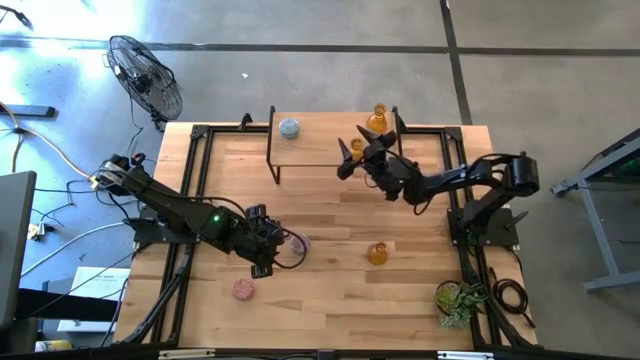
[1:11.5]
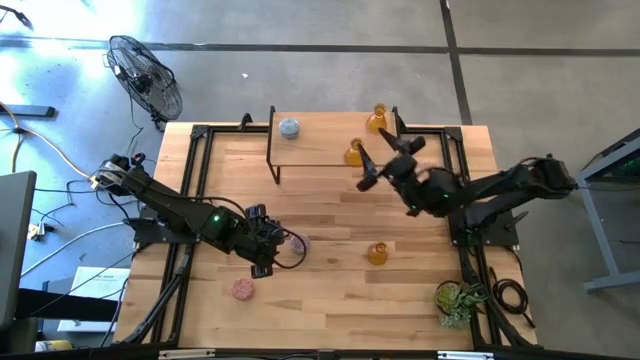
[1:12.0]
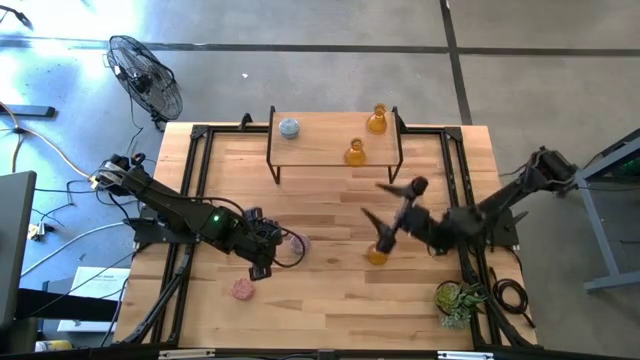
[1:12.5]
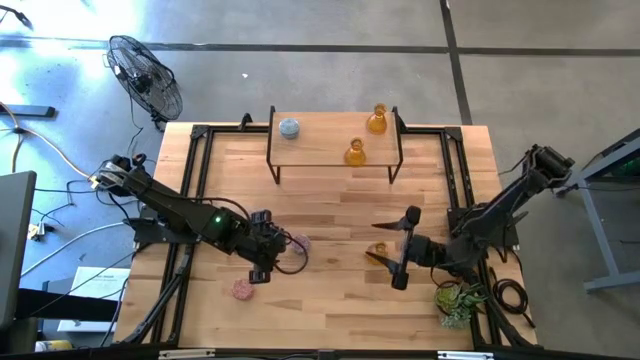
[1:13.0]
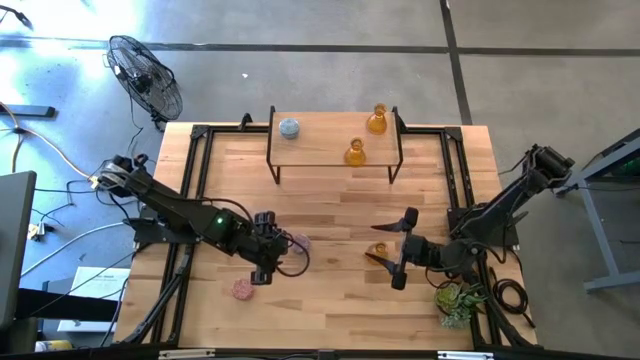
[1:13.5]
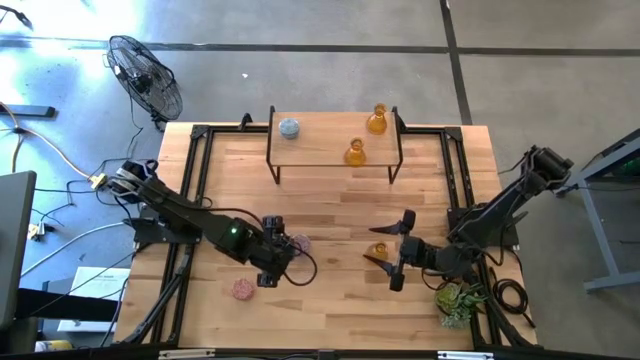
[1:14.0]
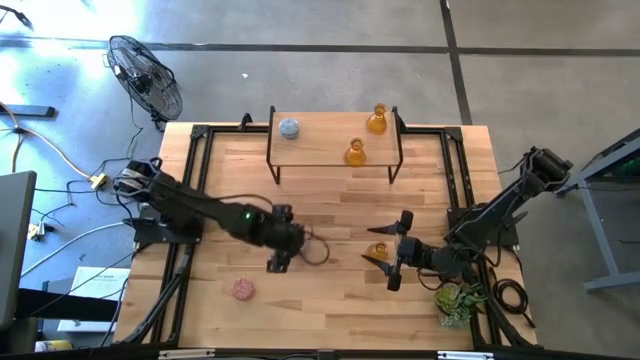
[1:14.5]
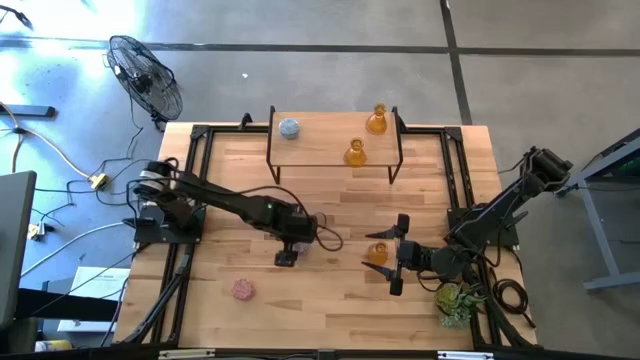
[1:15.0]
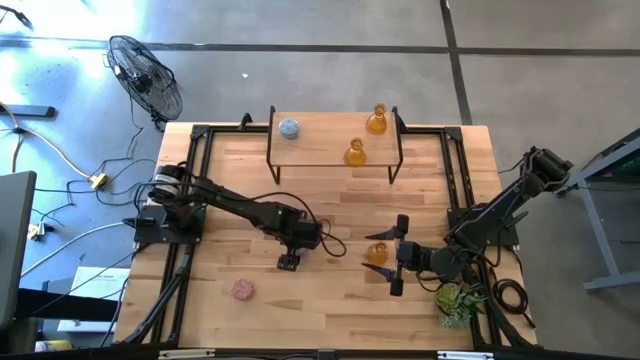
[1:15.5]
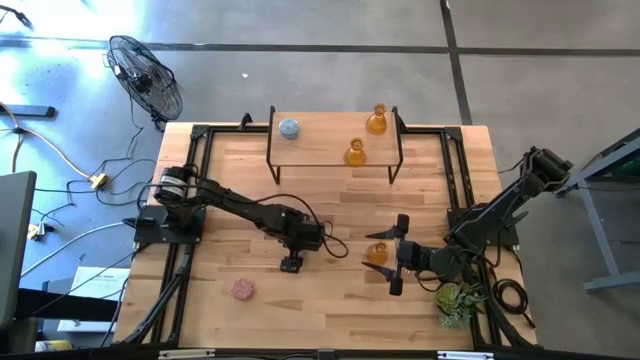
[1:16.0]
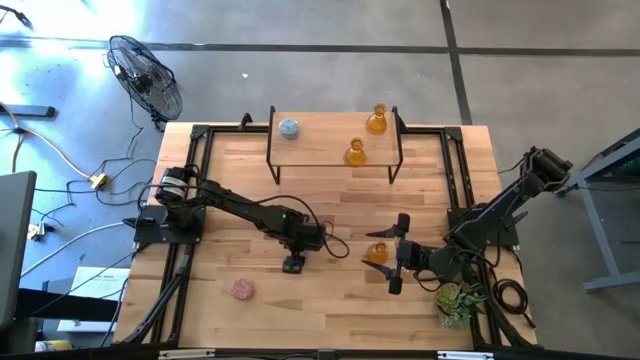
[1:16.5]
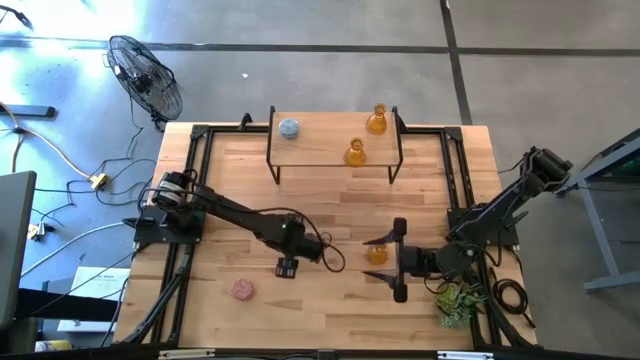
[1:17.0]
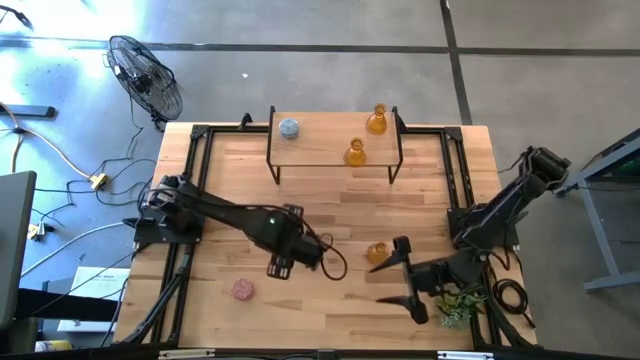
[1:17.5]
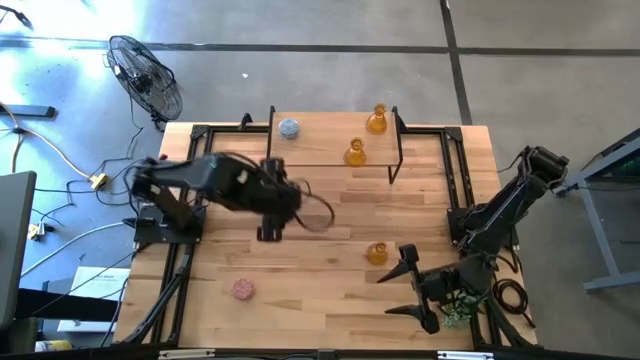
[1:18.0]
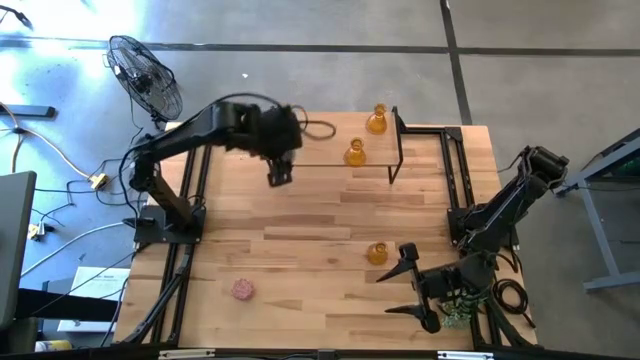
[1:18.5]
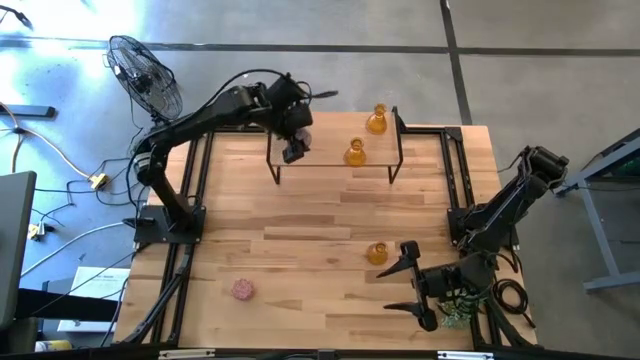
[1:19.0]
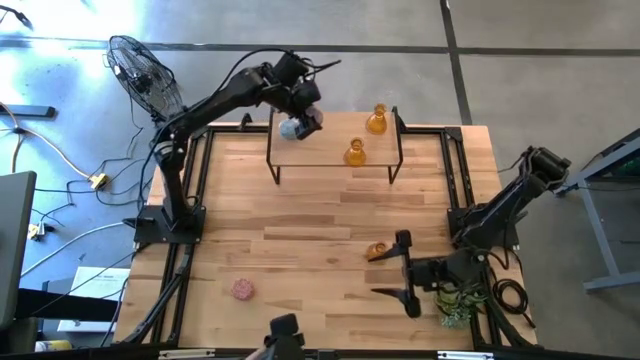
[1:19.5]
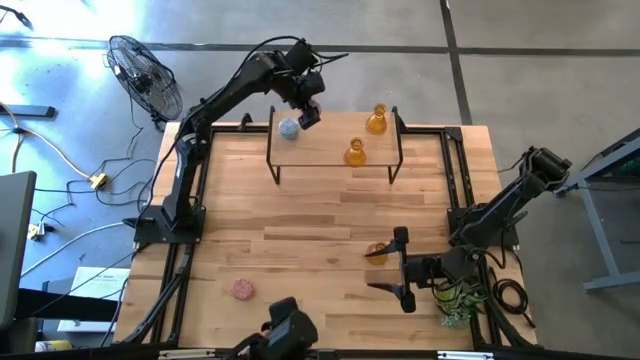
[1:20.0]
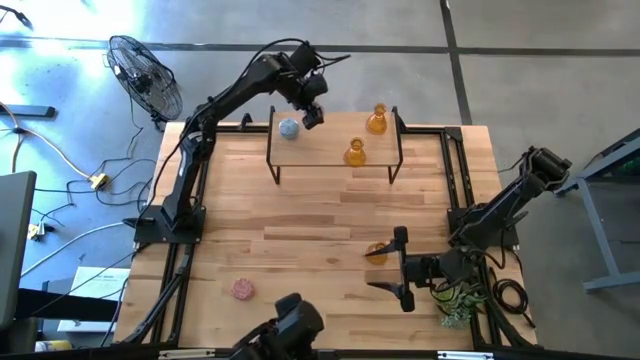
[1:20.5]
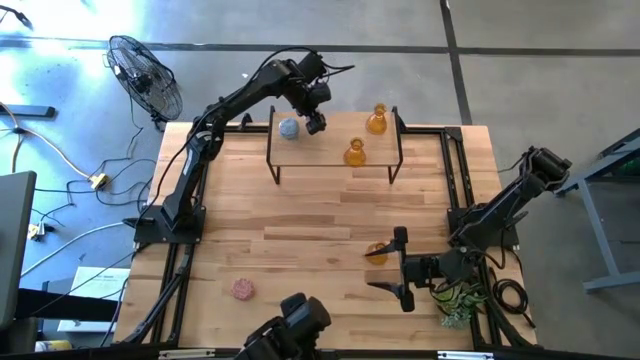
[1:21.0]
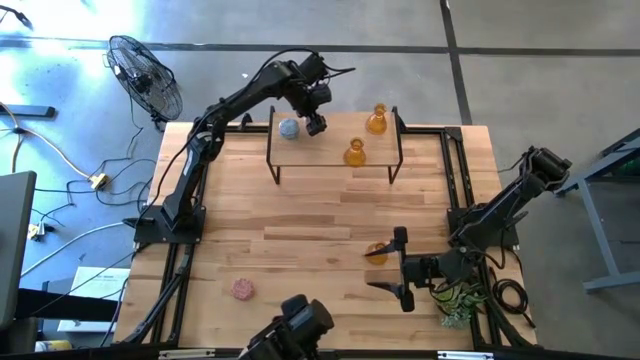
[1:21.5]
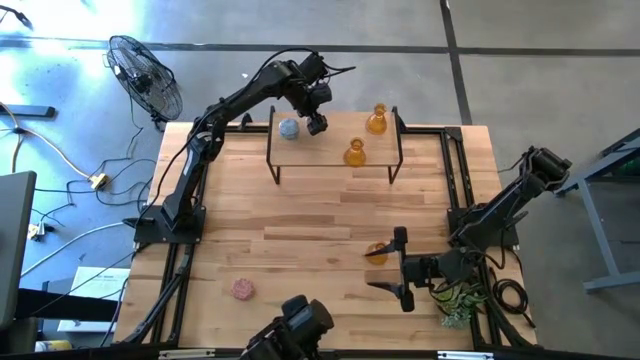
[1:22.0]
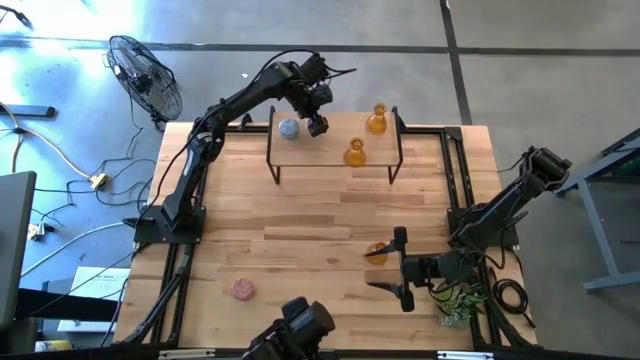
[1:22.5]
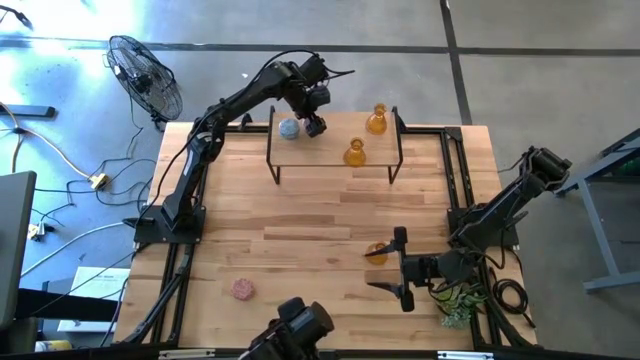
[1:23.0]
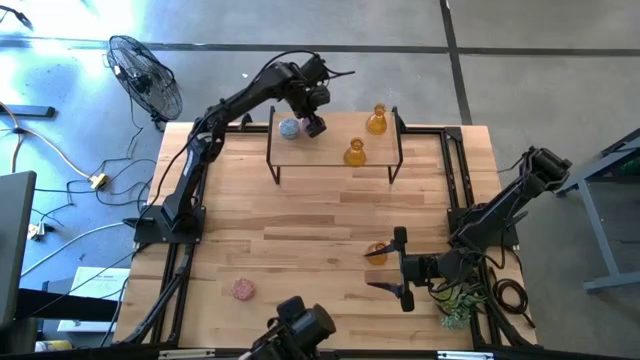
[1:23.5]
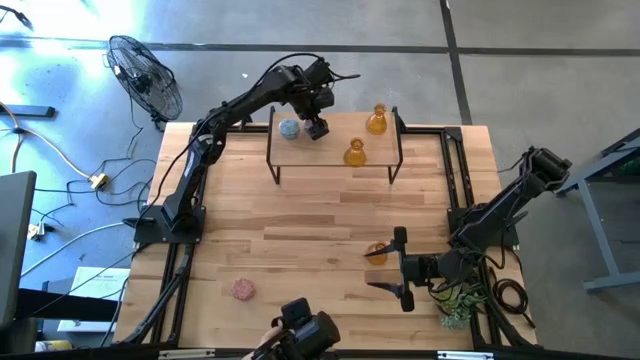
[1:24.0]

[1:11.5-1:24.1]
Task: Pick & Place candle stick holders
Put the red patterned candle on the shelf

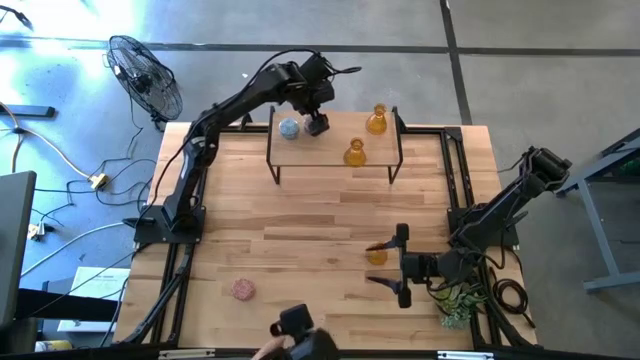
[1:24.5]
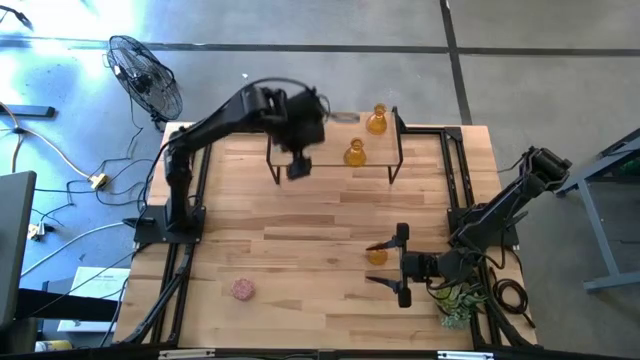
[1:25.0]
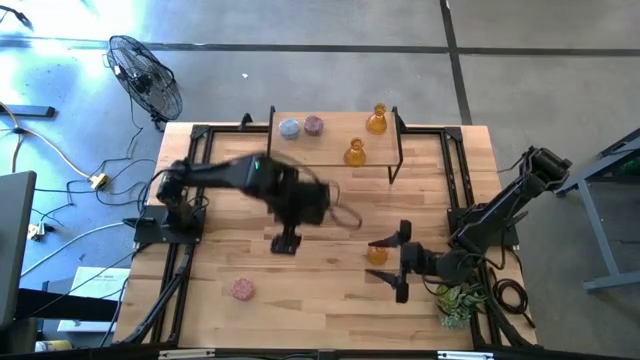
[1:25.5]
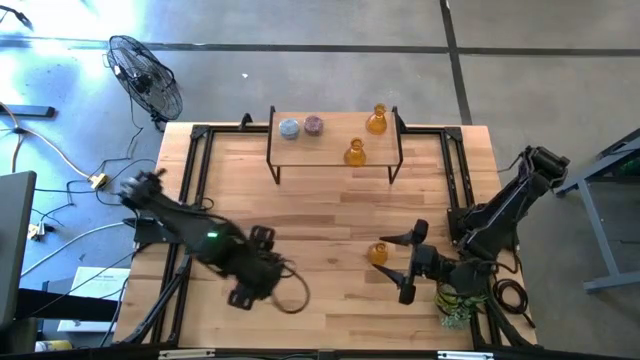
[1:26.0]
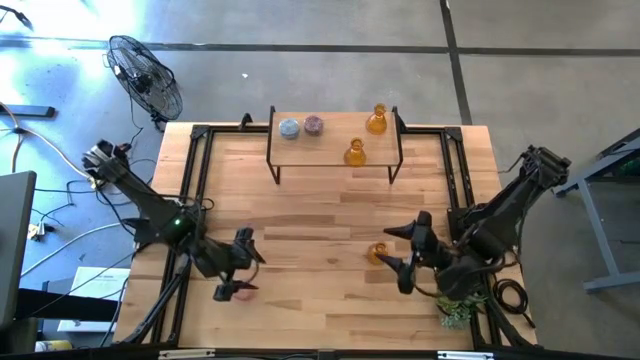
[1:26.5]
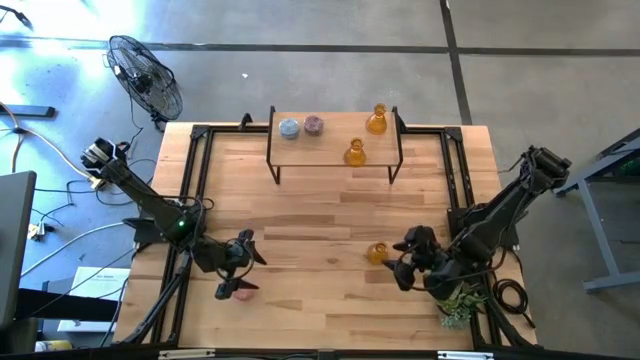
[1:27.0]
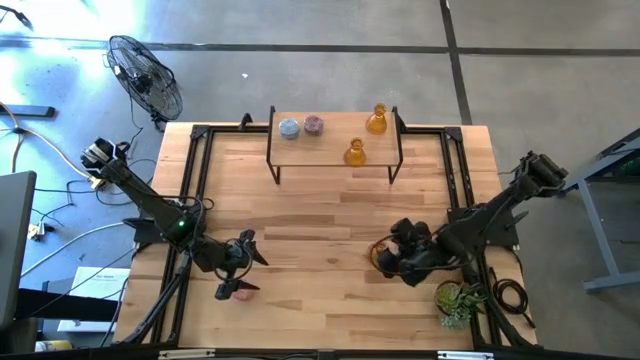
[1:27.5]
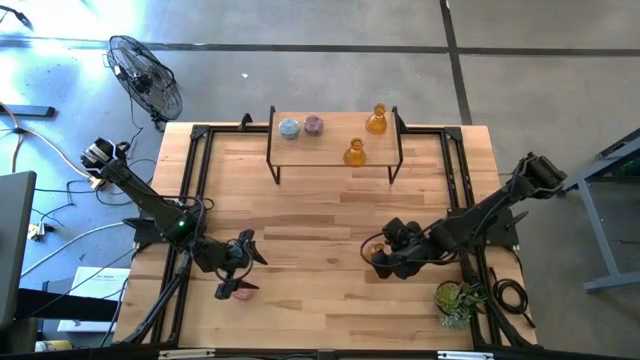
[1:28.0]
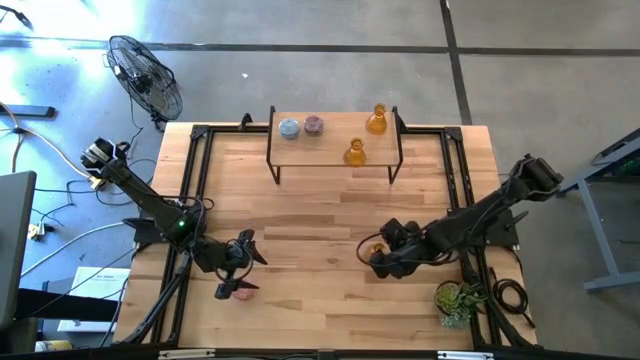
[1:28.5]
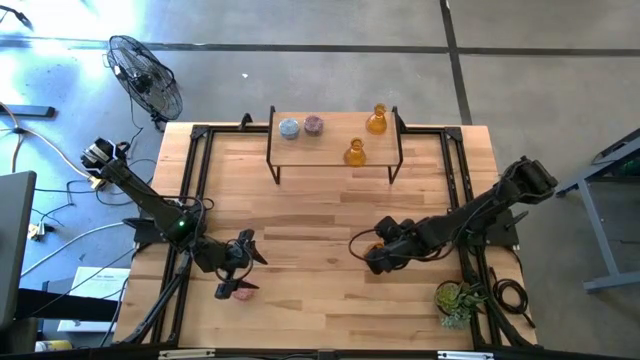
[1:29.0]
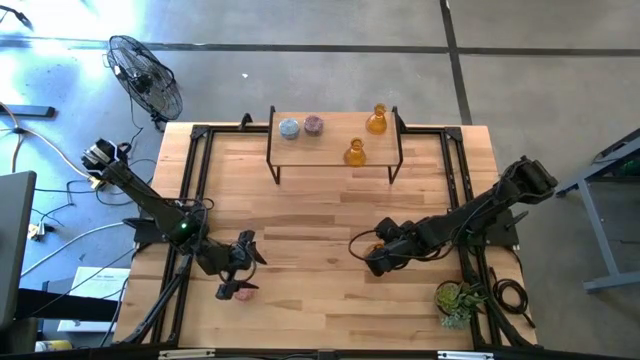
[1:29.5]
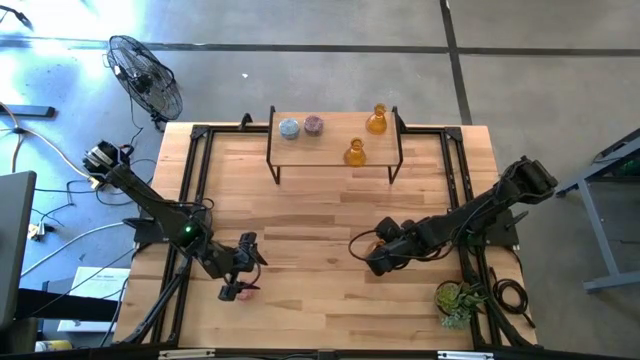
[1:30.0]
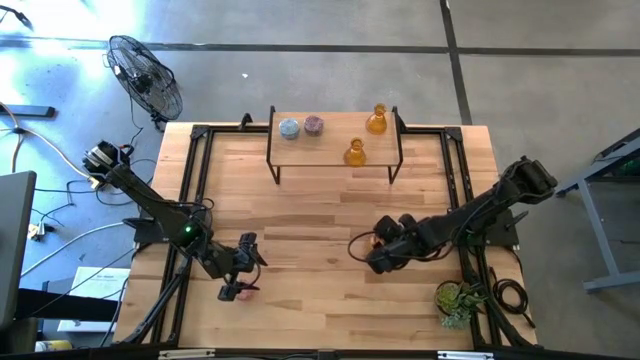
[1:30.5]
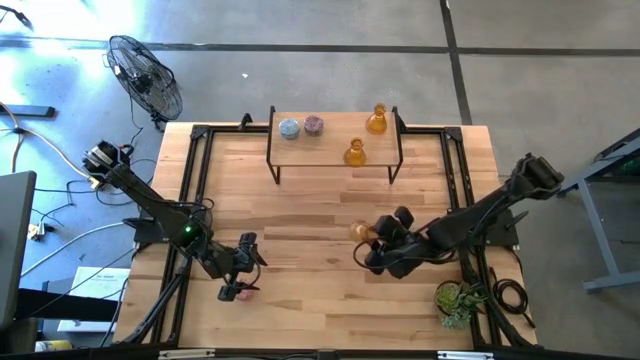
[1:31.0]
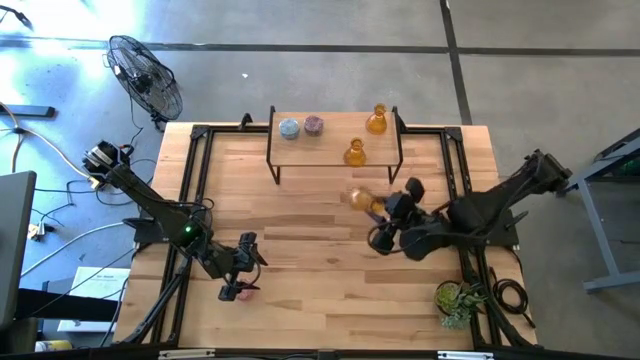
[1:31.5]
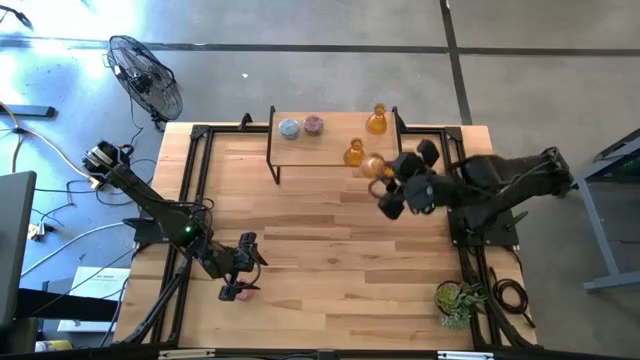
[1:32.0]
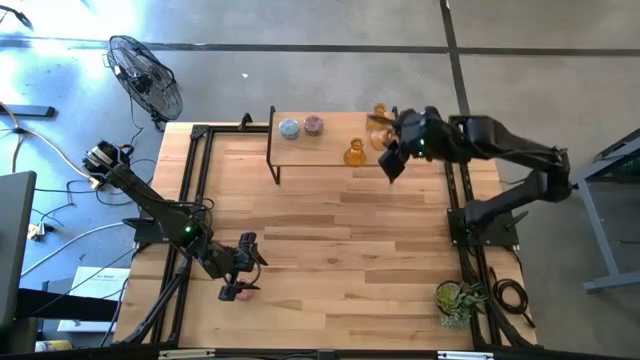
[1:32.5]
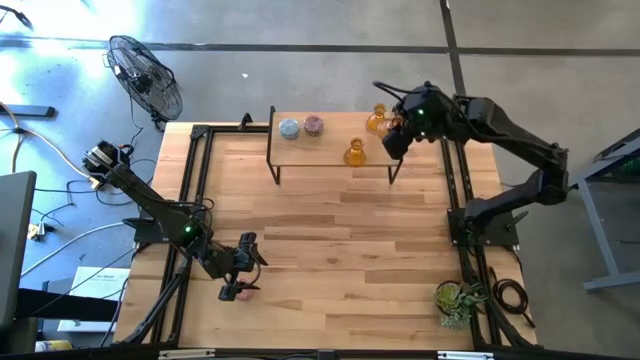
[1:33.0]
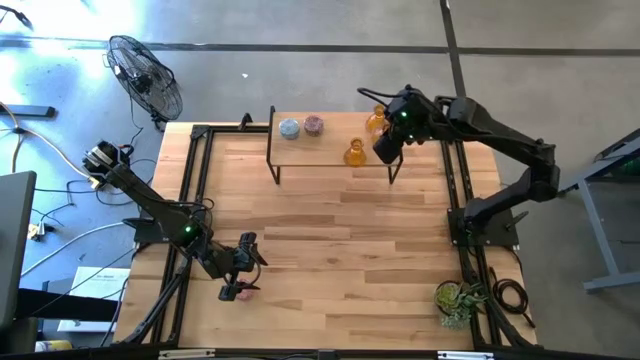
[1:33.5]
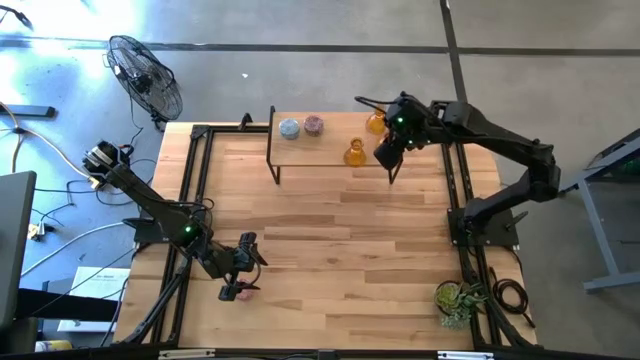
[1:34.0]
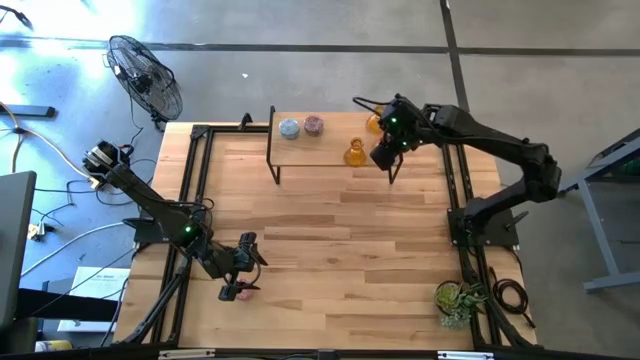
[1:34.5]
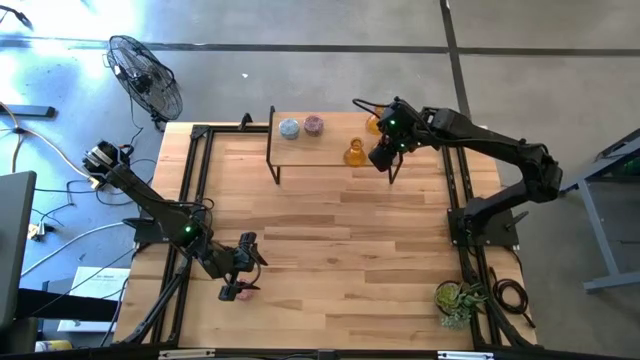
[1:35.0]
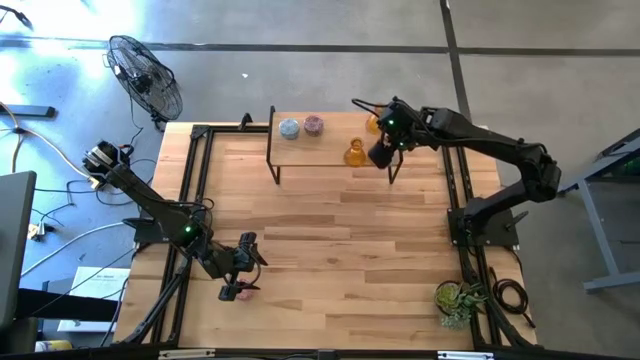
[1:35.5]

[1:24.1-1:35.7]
Put the orange candle holder on the shelf
